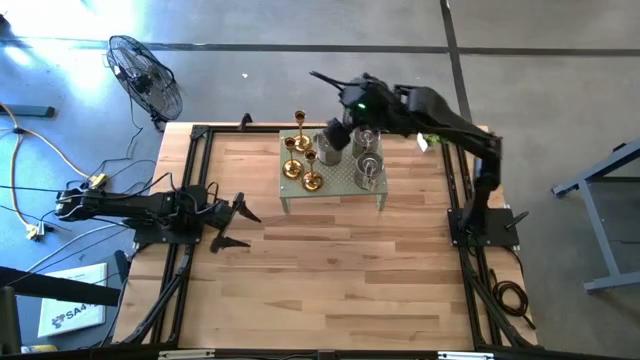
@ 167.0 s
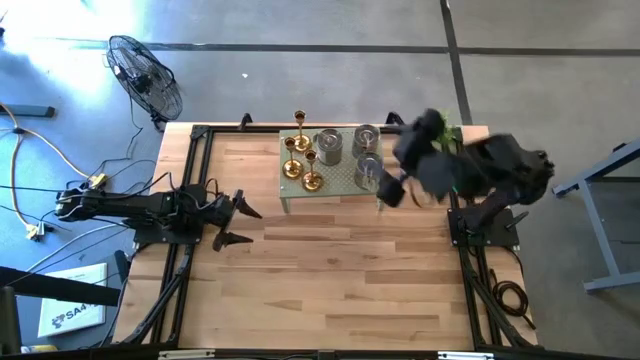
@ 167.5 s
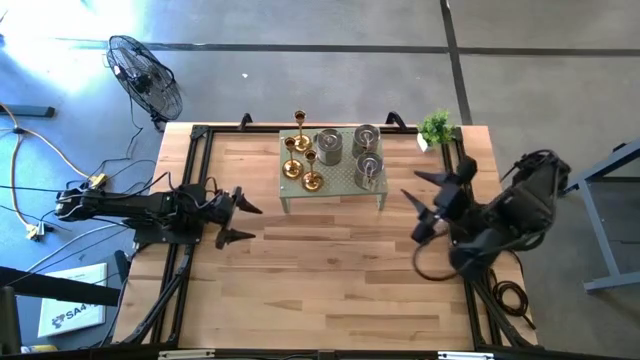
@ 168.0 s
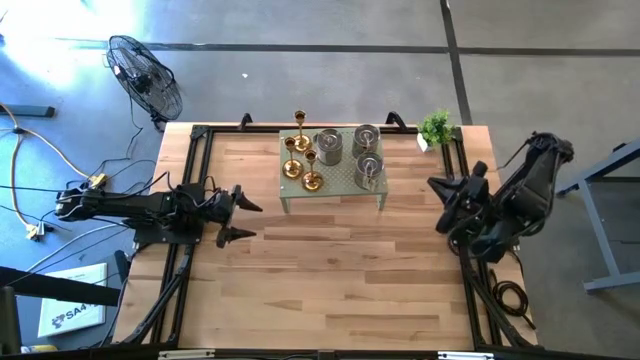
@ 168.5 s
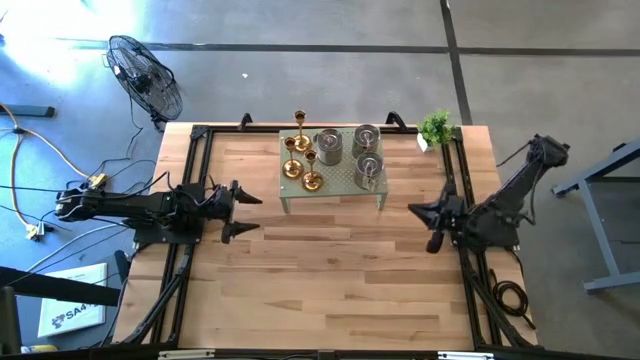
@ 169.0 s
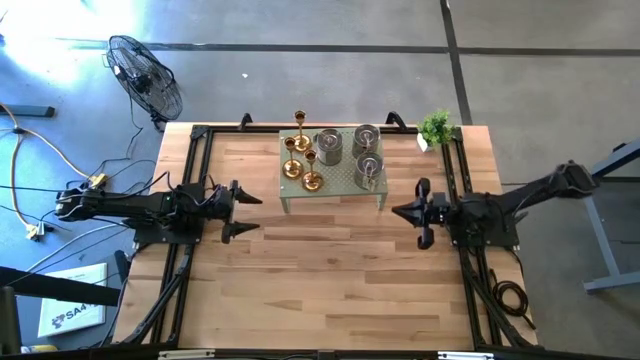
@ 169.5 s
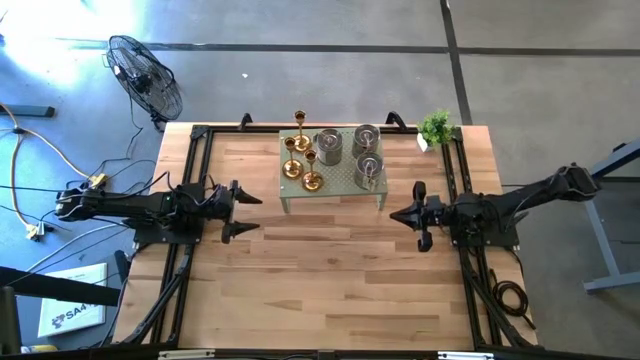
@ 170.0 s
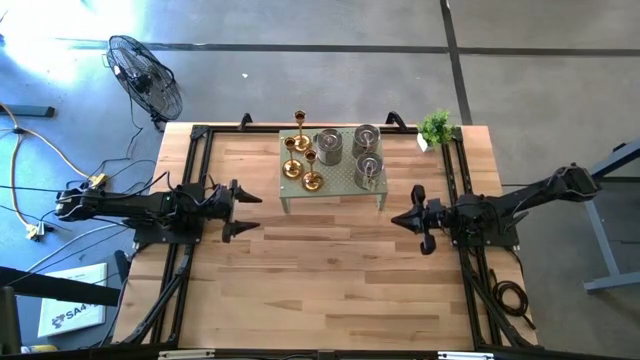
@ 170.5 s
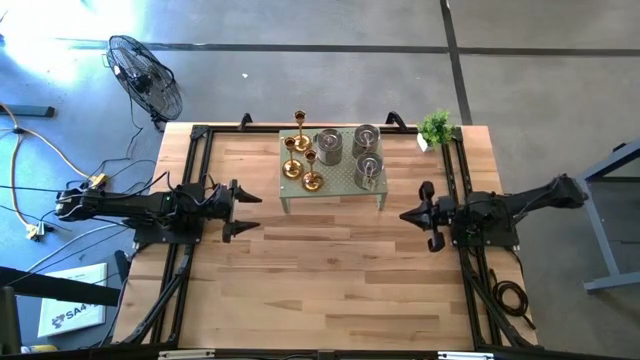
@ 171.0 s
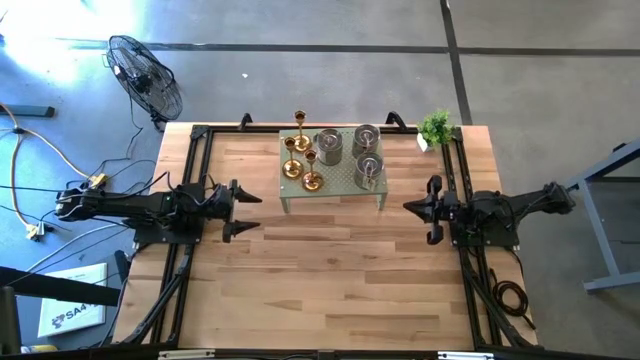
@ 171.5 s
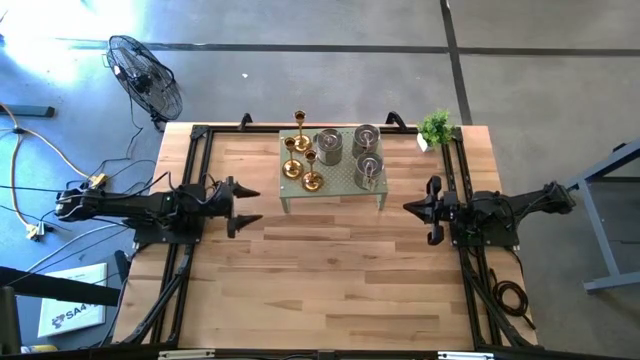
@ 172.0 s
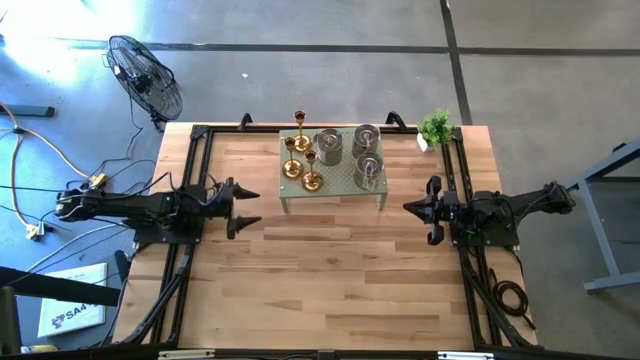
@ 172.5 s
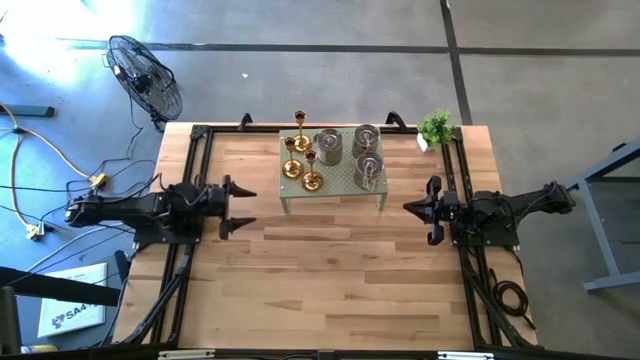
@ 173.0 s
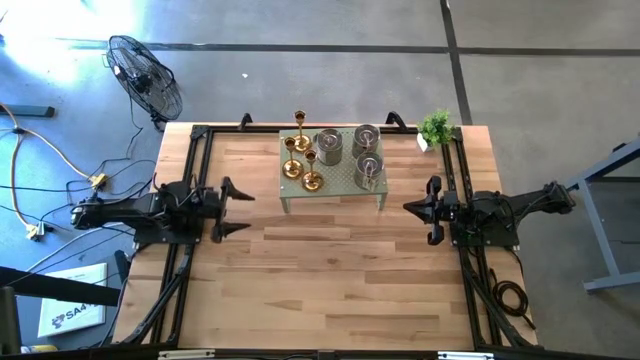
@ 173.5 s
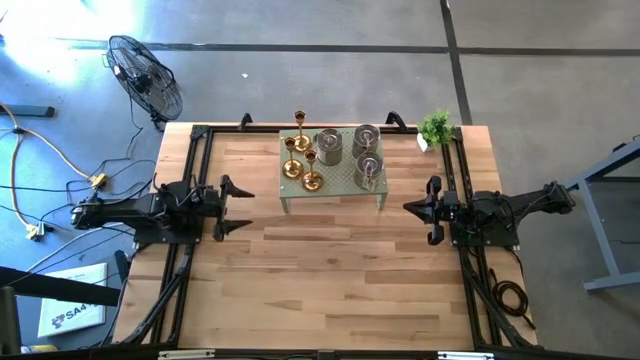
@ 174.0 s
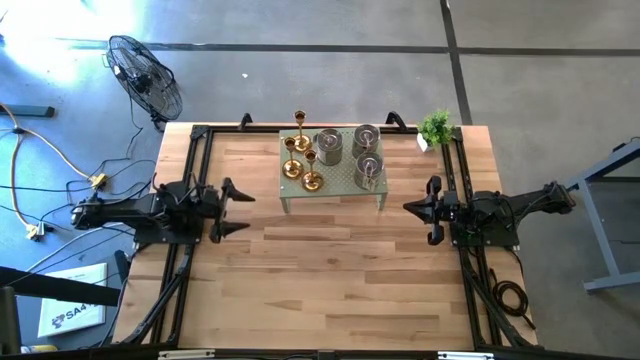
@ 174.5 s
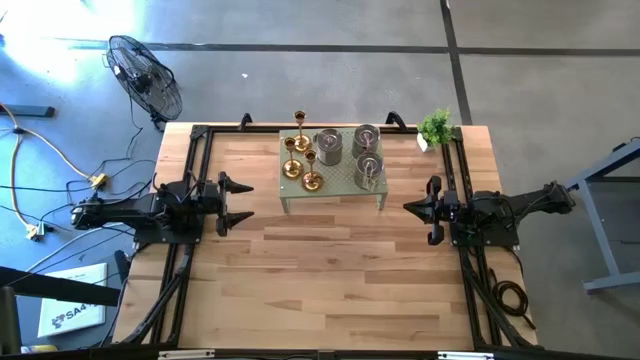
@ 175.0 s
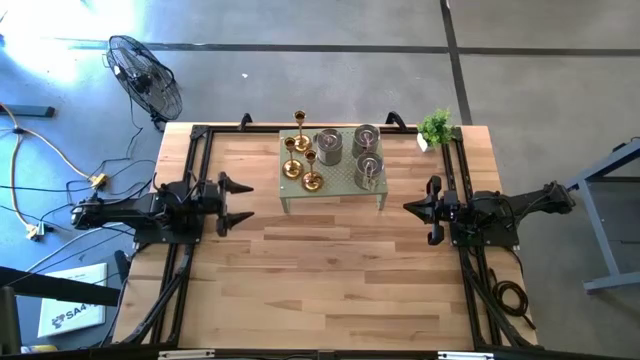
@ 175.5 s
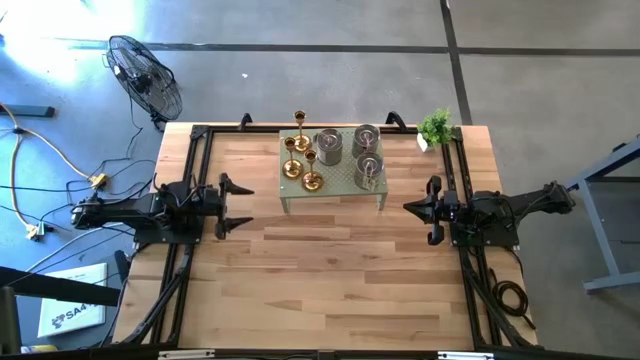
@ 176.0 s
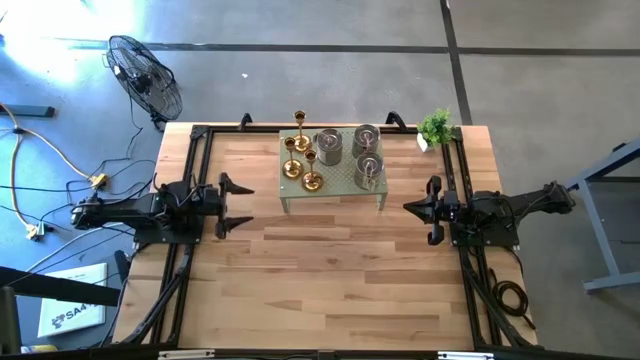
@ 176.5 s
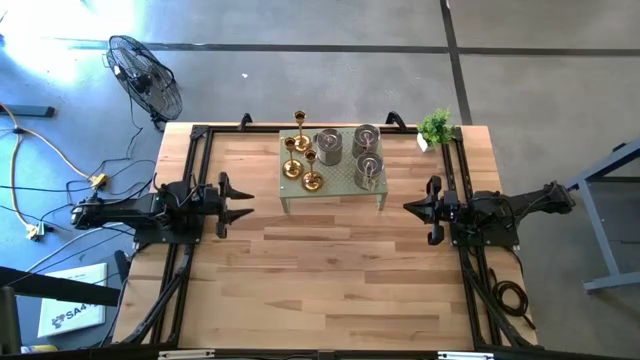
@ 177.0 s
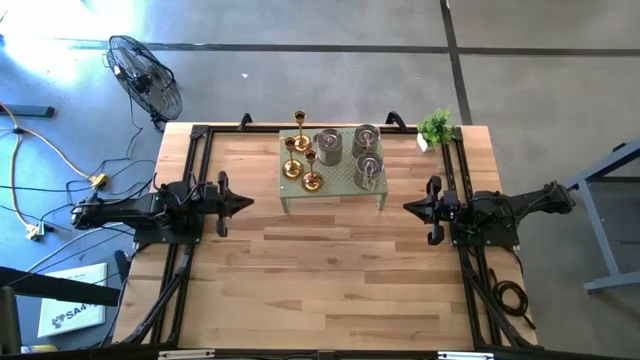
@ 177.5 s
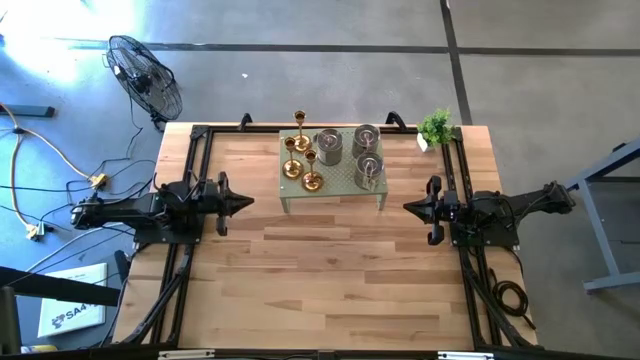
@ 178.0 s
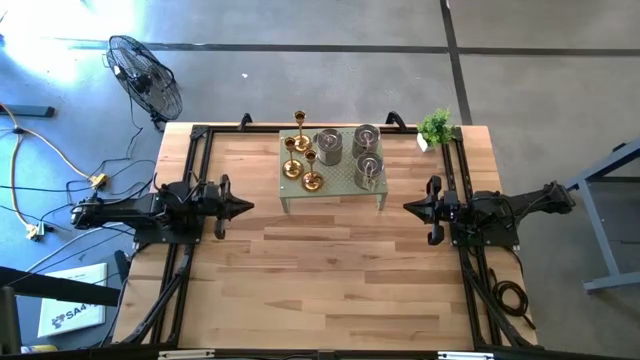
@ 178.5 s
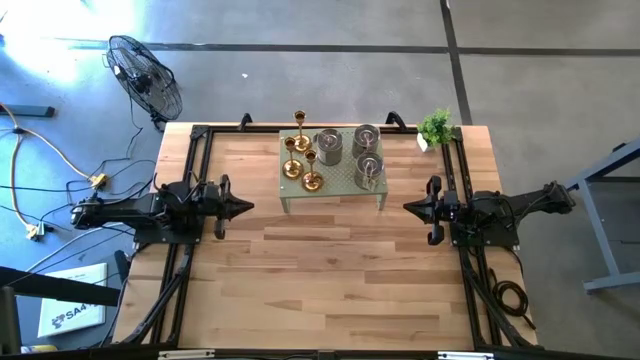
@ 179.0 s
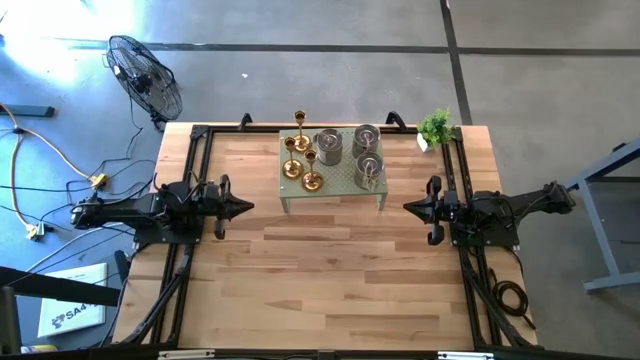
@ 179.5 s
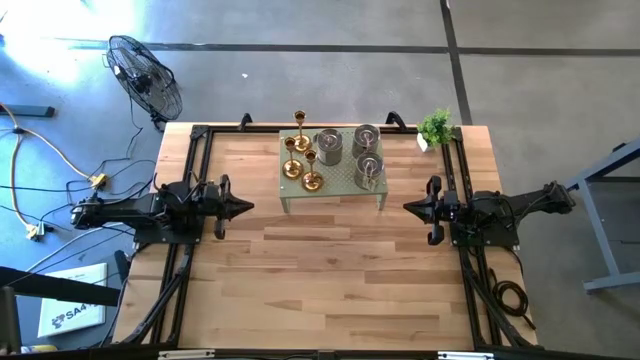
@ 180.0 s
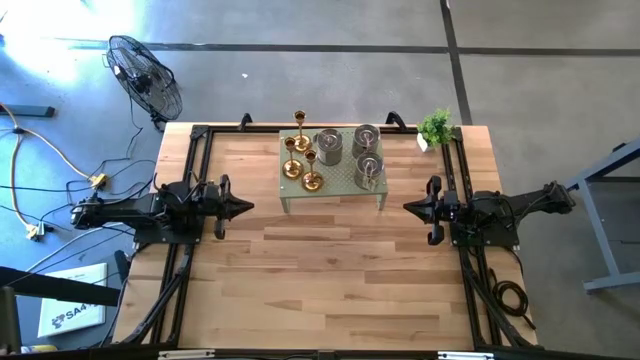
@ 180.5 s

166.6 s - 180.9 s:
Task: Pick & Place candle stick holders
Return to Home Position

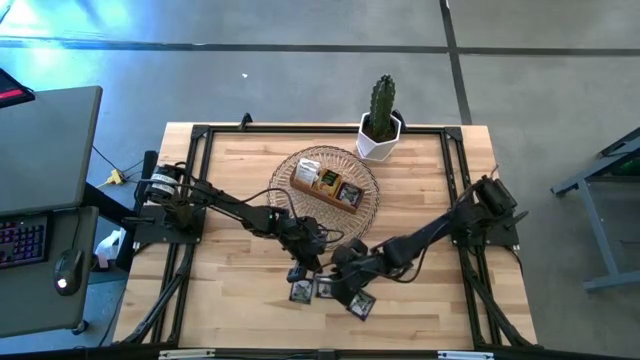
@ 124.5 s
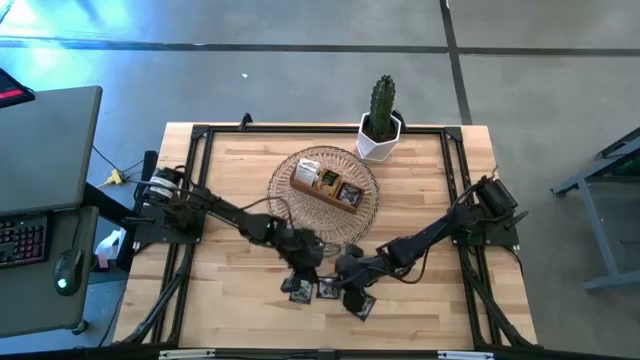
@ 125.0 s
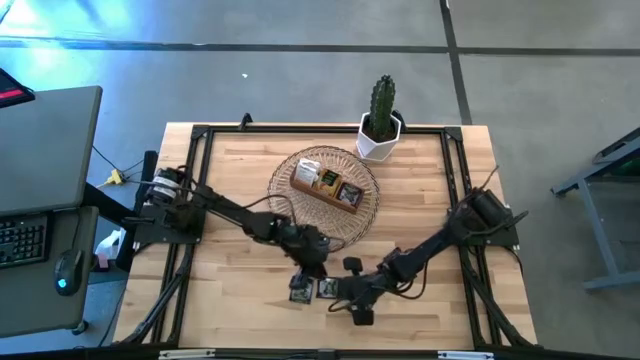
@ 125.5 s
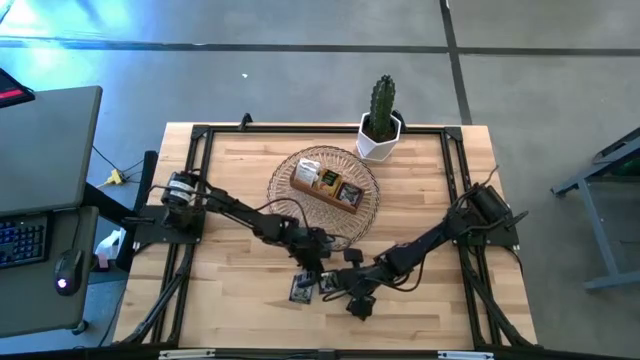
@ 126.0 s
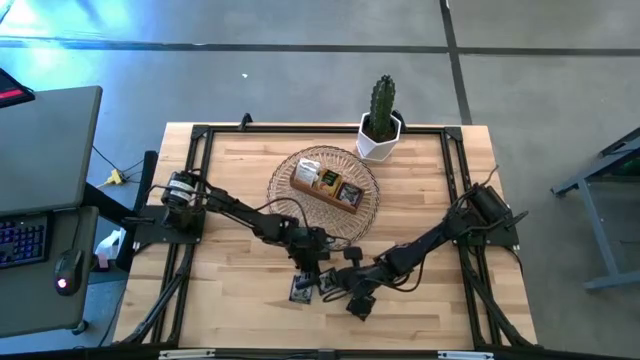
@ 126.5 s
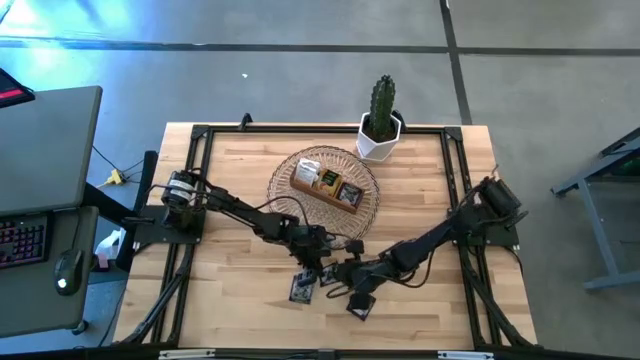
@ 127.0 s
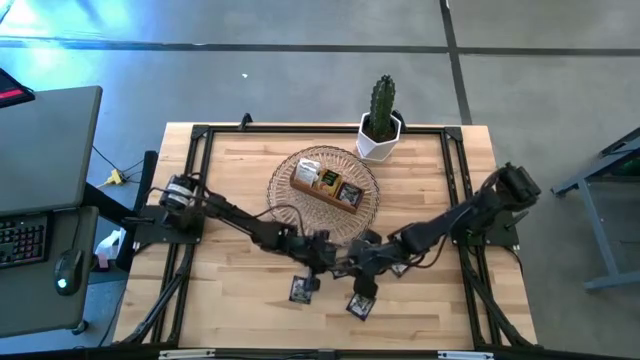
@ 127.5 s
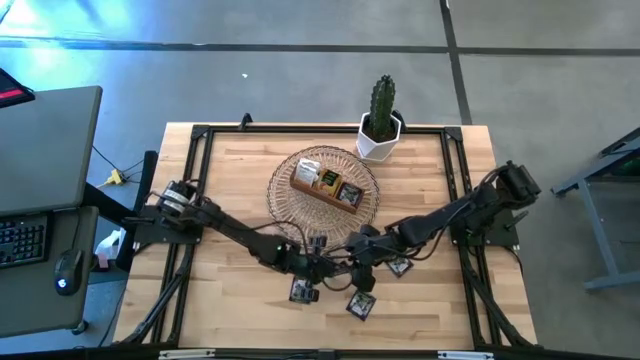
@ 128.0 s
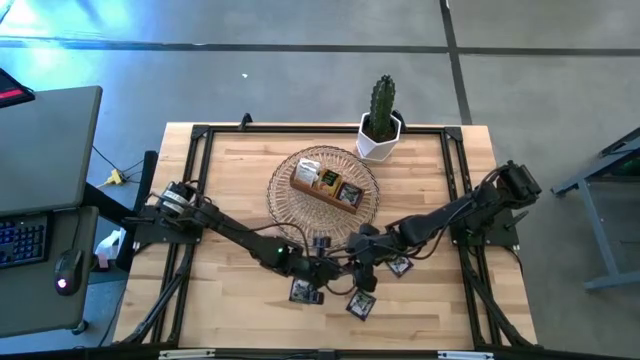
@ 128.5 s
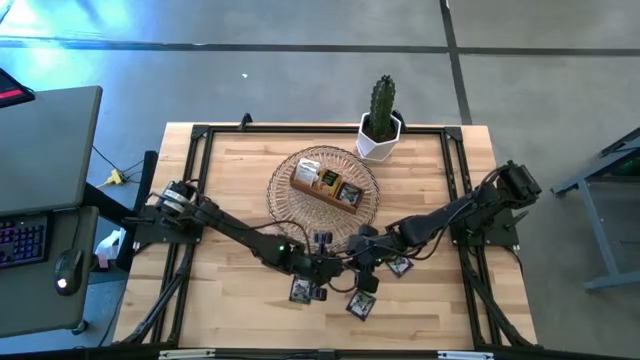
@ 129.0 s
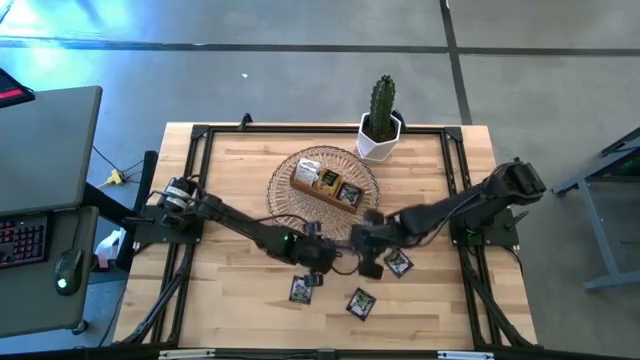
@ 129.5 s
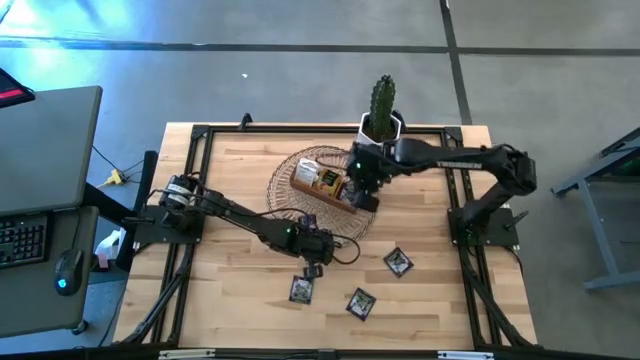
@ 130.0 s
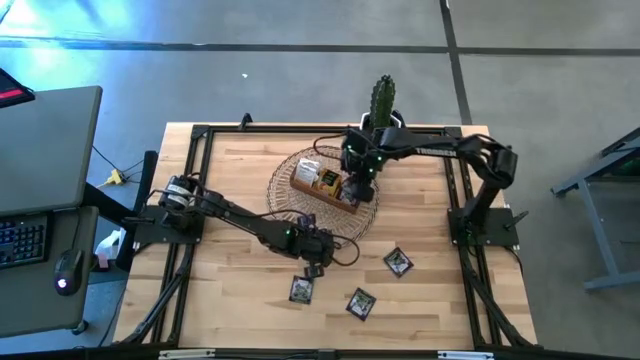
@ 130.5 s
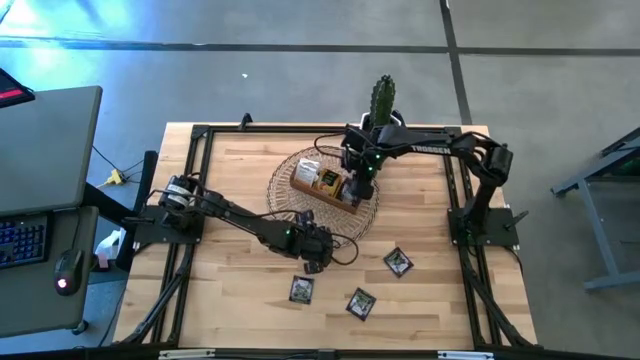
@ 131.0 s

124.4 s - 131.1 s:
Task: Pick & Place Tea
Put the purple tea pack into the right section of the wooden organizer
